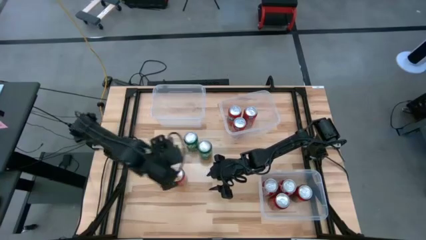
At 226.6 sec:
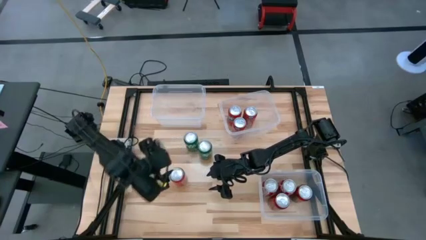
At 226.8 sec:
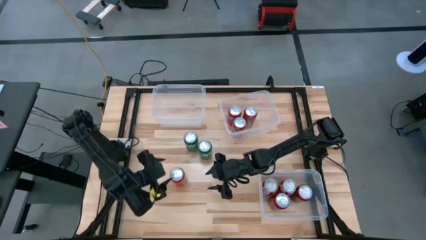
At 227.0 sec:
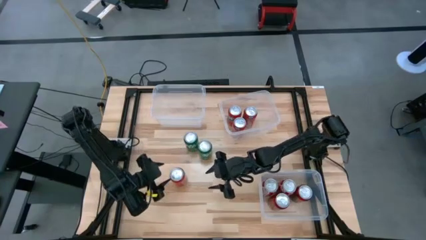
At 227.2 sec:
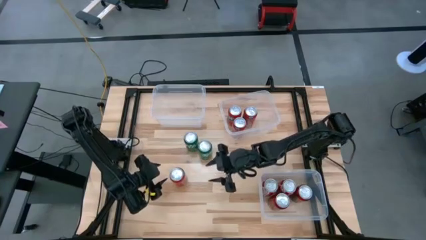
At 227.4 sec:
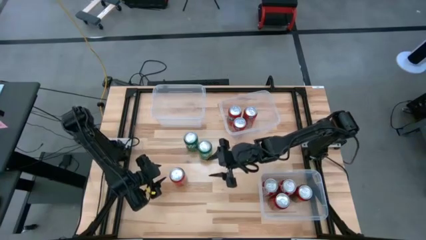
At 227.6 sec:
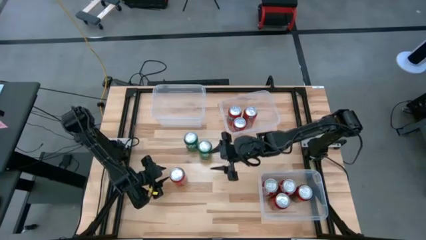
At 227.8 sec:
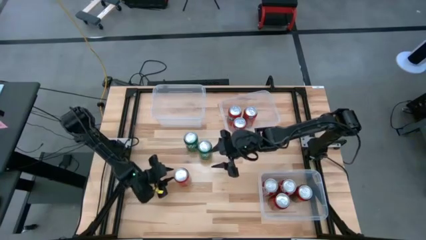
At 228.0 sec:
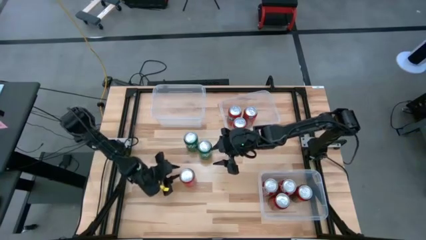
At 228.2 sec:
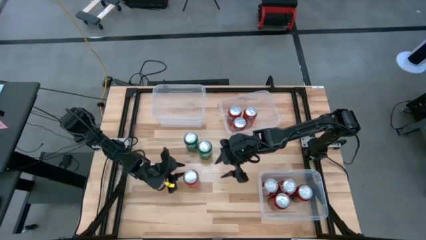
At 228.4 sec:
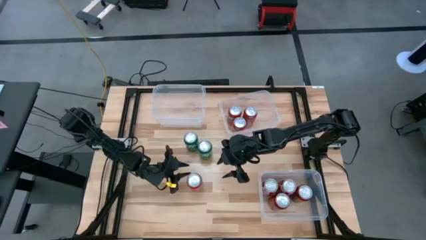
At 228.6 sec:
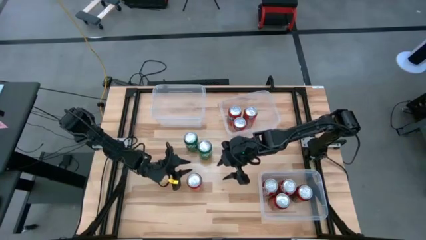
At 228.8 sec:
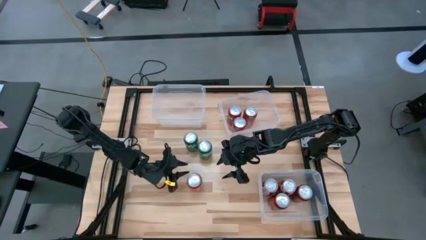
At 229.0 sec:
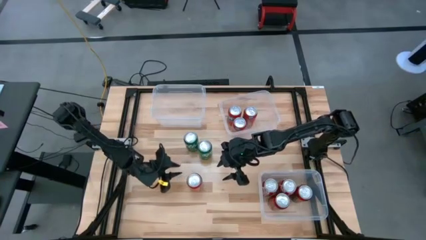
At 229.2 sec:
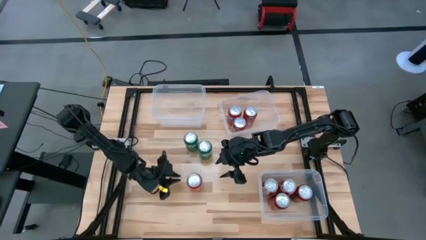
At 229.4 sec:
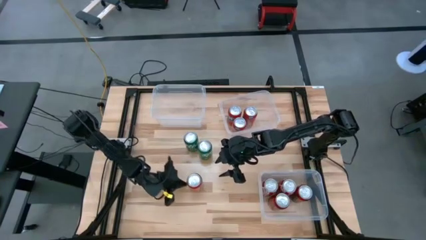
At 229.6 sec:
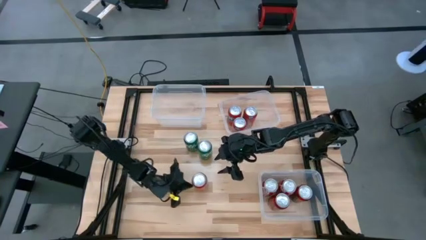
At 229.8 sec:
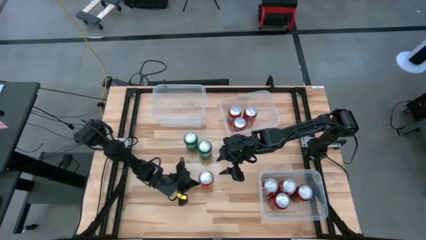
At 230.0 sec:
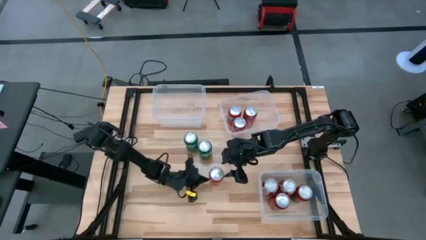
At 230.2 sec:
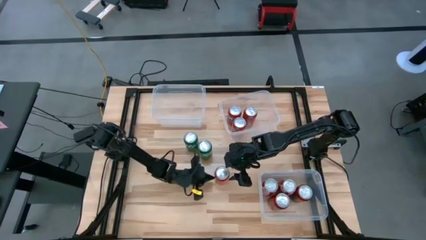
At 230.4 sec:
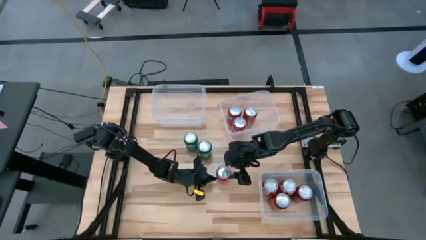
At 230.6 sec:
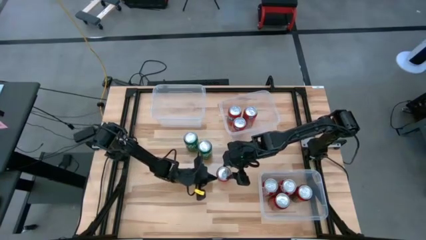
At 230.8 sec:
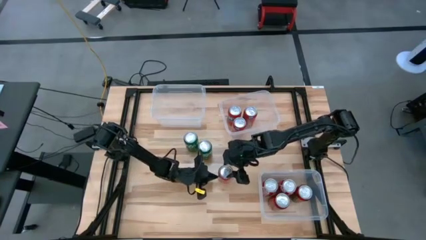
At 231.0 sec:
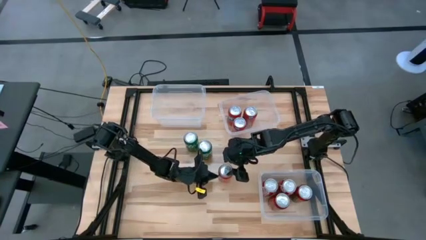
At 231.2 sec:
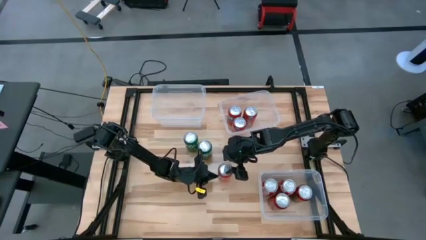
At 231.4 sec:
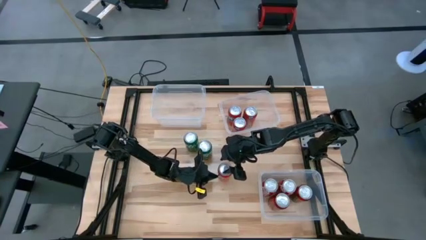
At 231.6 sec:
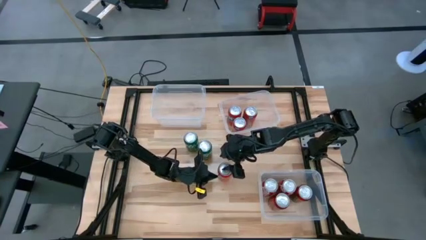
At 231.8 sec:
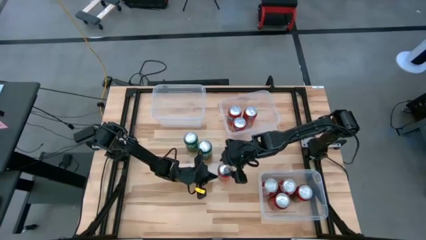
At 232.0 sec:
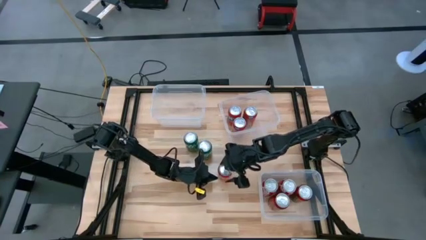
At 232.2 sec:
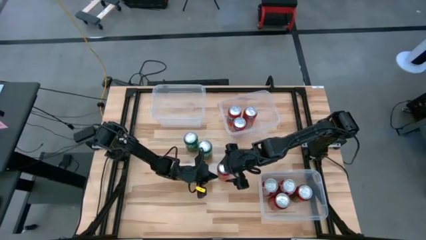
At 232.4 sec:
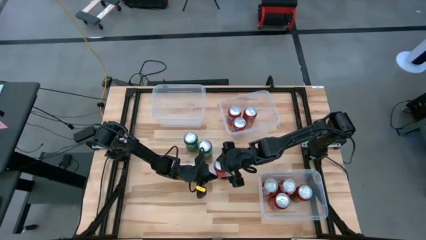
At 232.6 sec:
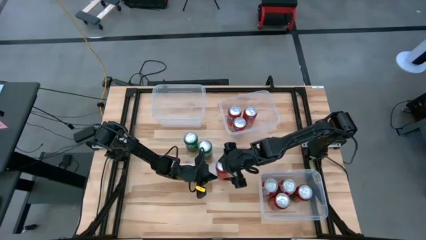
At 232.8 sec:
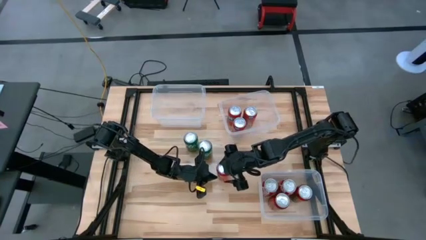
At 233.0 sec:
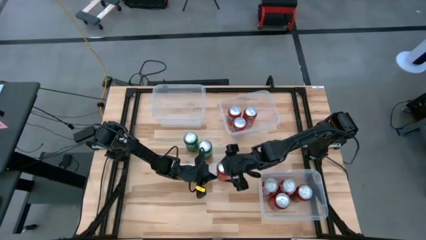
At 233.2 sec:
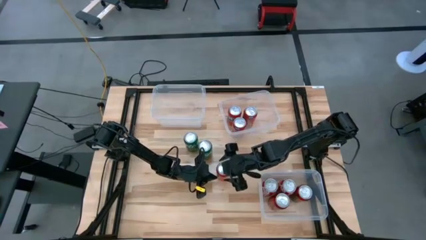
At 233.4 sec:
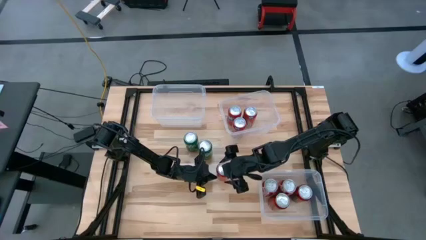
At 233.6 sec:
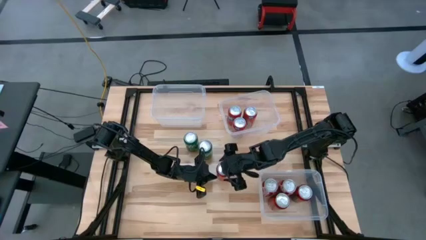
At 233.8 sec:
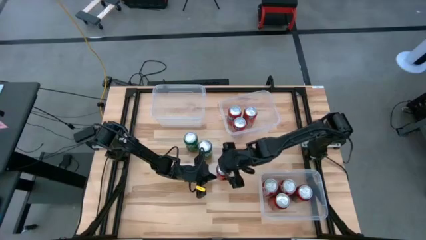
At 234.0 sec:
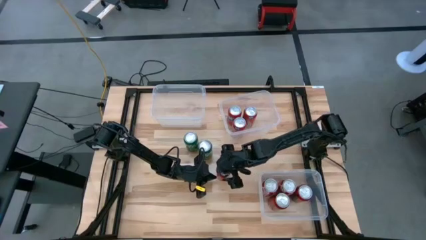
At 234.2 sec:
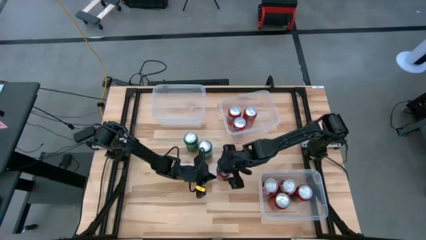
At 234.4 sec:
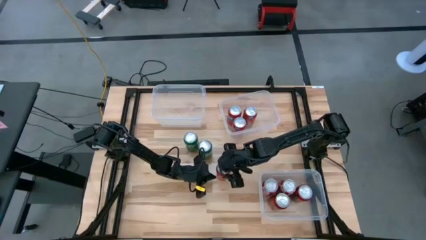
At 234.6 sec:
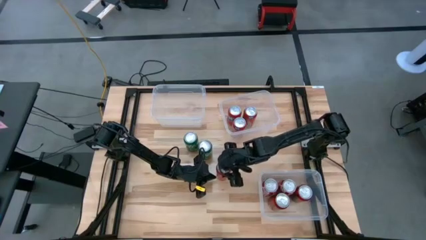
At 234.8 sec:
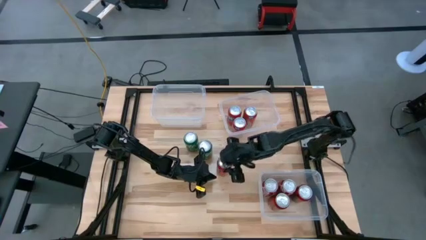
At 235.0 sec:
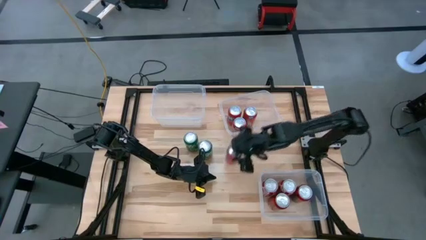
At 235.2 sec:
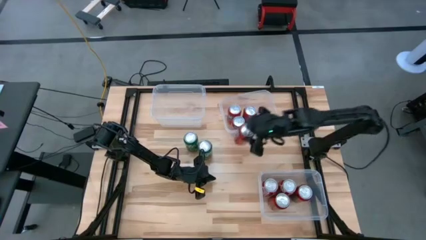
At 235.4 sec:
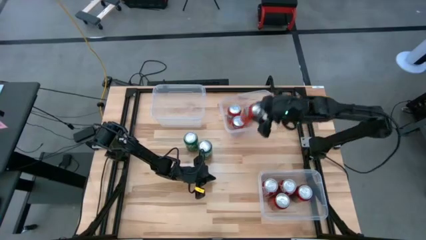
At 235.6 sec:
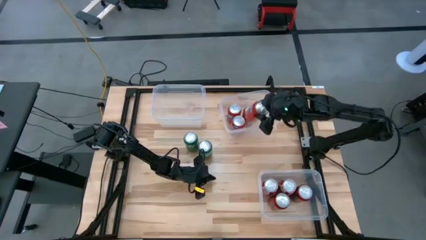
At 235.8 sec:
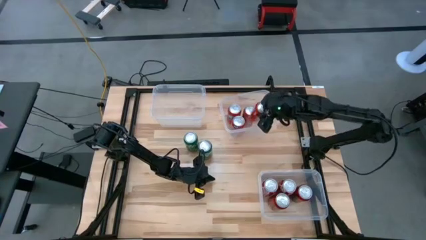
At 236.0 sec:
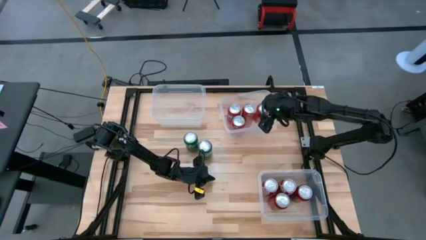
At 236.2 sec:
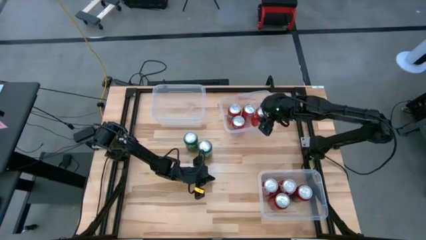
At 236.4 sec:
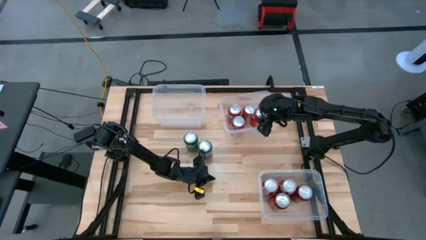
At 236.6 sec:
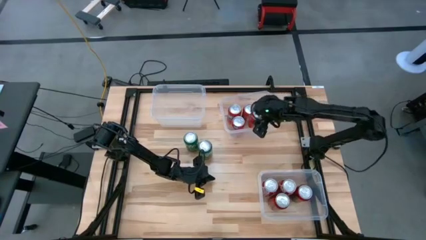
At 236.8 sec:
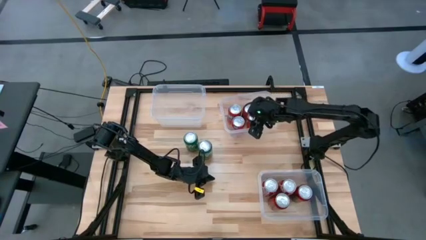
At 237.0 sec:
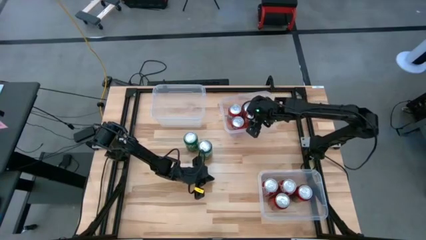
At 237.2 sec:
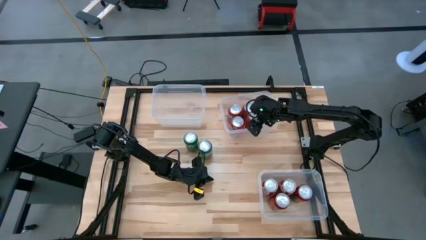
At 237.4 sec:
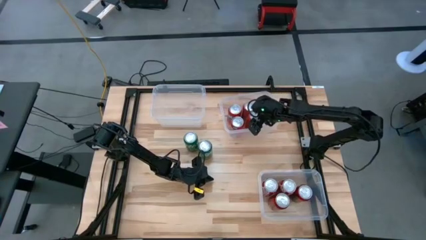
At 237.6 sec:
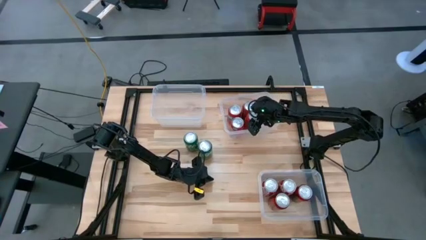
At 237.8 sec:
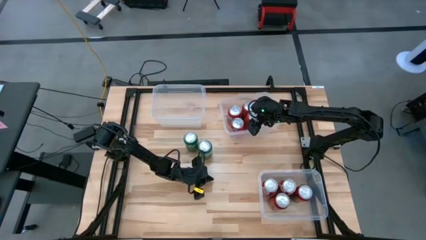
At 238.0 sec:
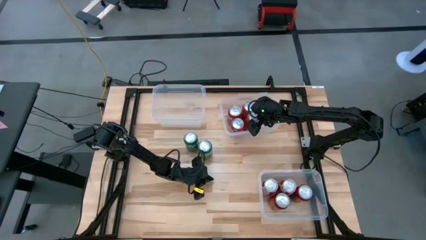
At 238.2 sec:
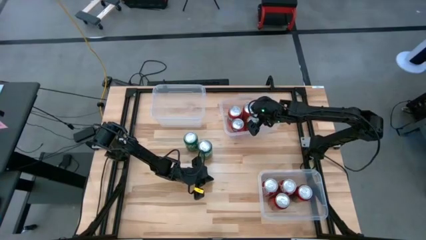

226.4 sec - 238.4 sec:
Task: Sort soda cans
Put the red soda can into the top right transparent bin

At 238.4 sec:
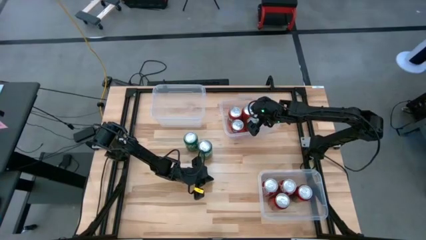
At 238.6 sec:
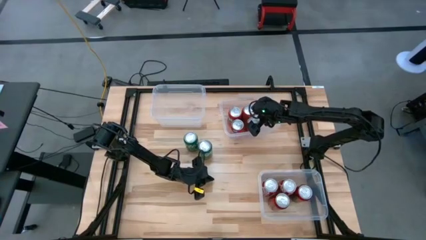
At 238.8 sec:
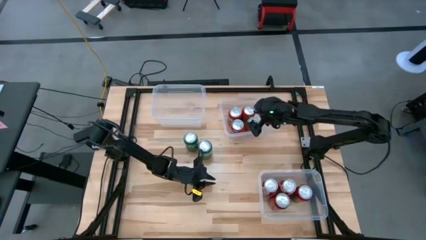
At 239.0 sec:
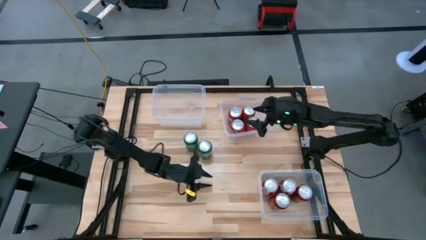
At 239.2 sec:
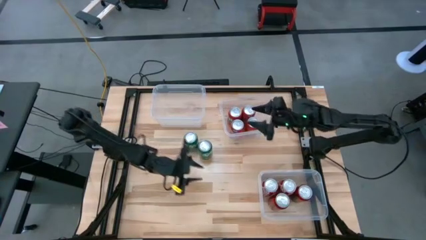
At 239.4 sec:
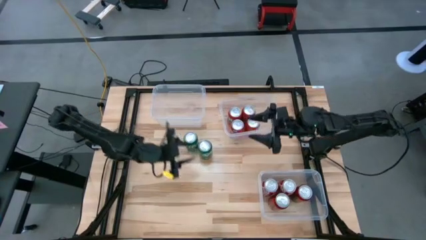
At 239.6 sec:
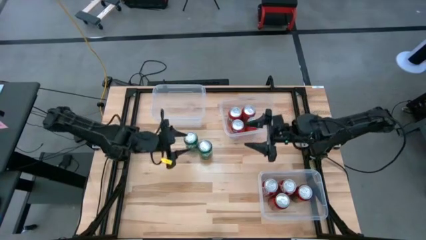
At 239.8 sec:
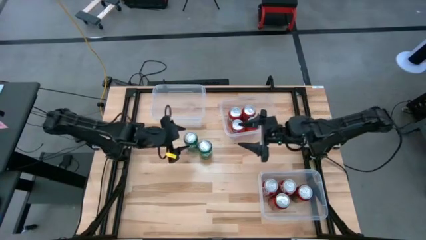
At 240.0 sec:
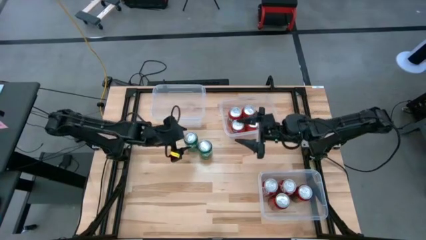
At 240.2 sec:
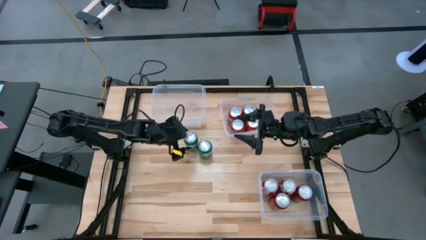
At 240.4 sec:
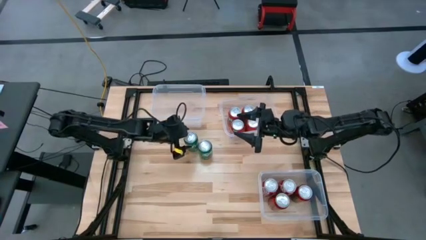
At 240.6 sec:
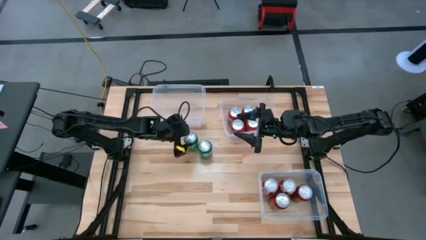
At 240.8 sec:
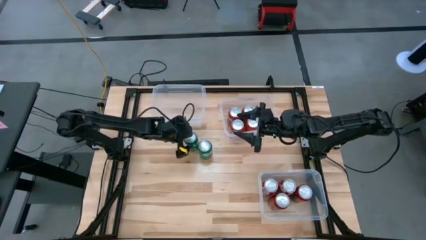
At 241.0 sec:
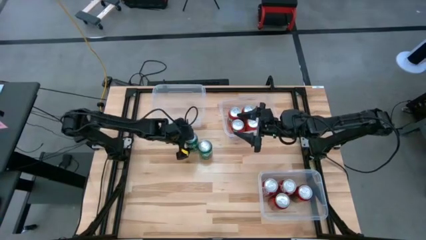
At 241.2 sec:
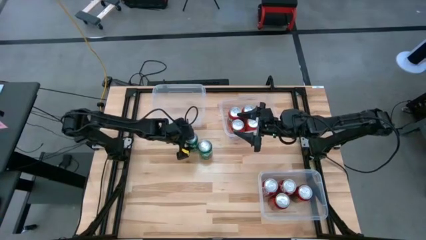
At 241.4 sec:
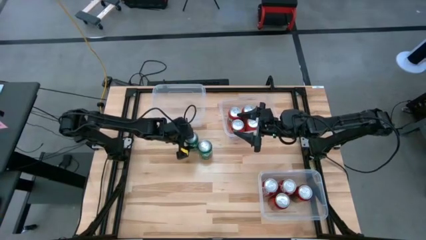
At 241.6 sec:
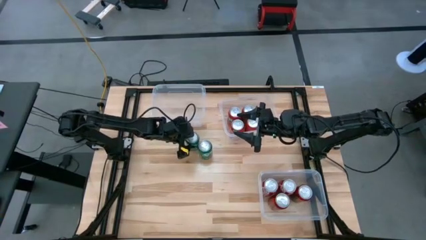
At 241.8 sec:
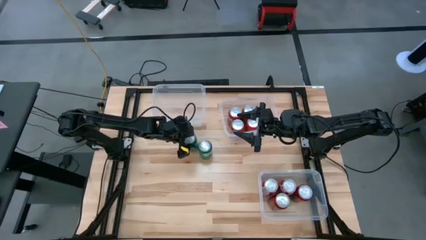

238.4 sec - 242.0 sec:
Put the left green soda can into the top left transparent bin

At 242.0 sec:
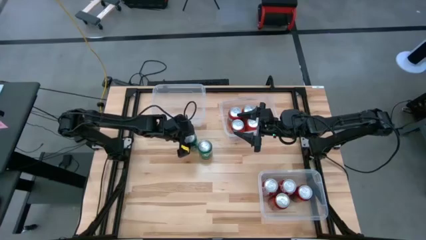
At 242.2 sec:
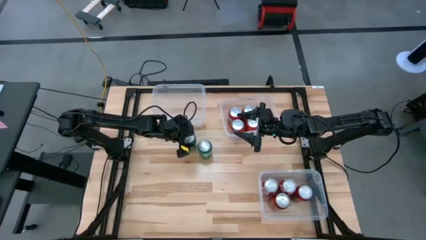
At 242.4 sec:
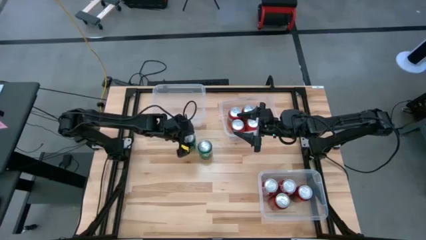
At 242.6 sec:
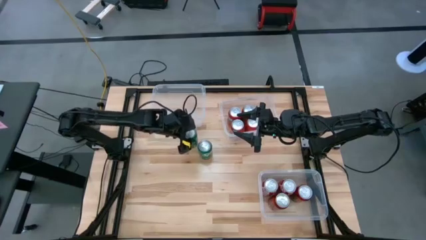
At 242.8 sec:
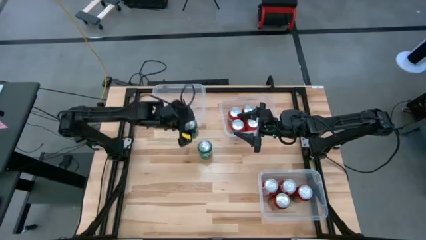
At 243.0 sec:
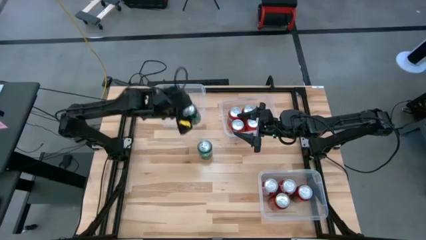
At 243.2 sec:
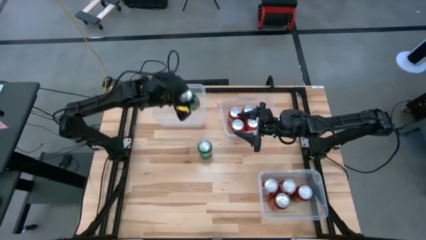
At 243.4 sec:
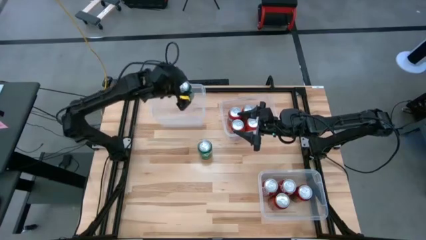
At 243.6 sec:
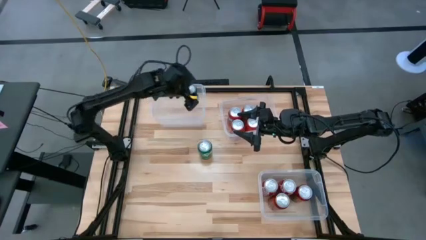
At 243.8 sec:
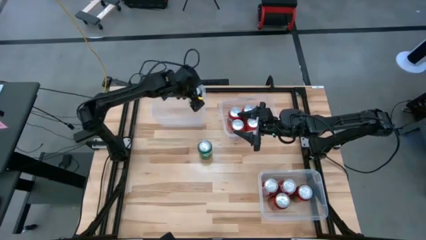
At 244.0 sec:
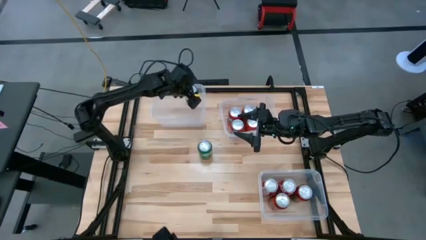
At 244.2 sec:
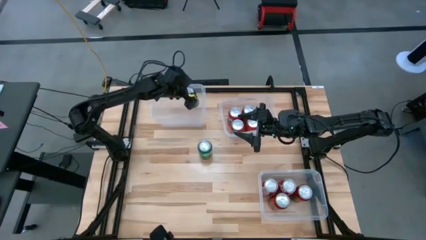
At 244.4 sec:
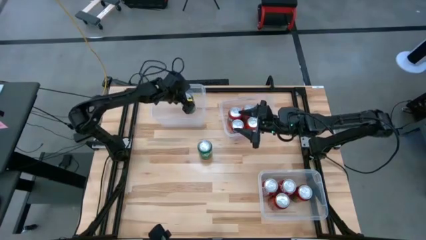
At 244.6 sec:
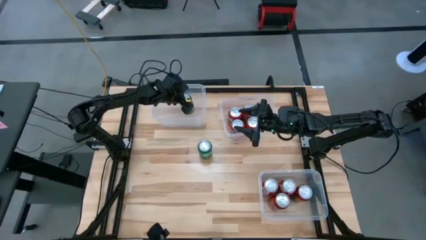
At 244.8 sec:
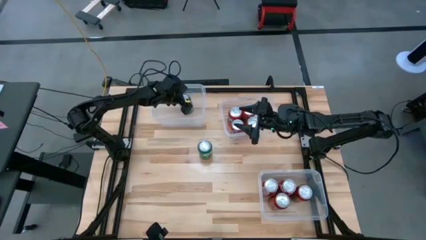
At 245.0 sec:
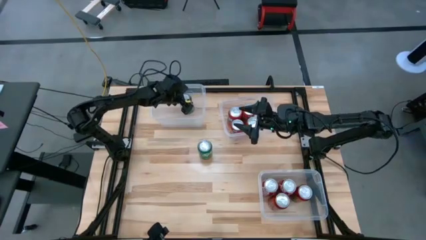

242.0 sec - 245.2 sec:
Put the left green soda can into the top left transparent bin
